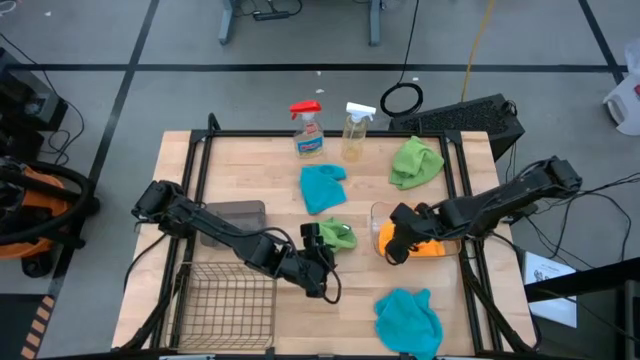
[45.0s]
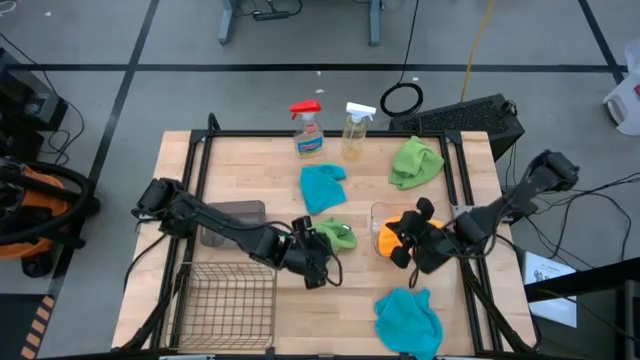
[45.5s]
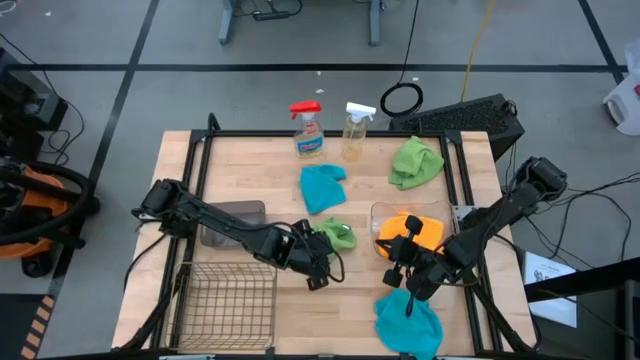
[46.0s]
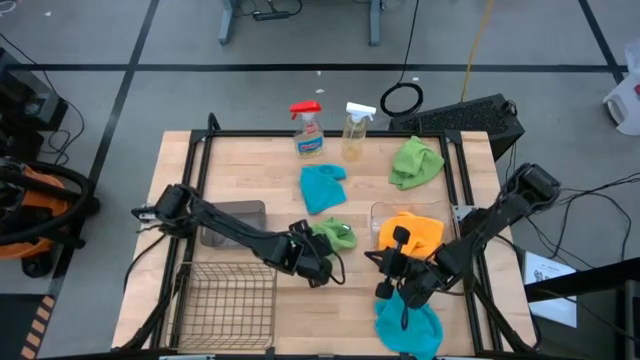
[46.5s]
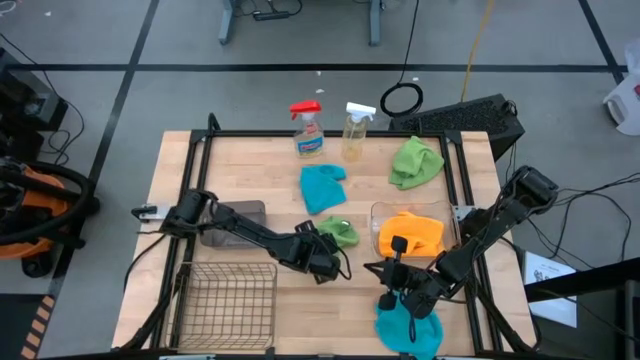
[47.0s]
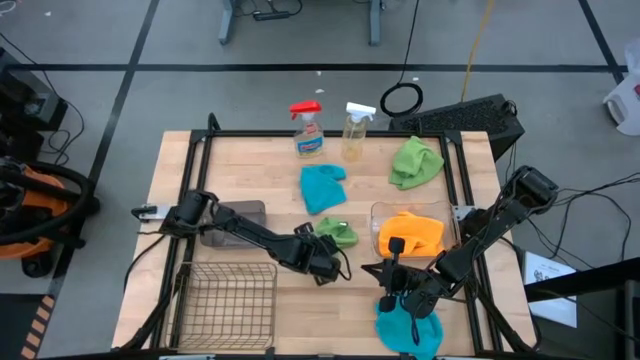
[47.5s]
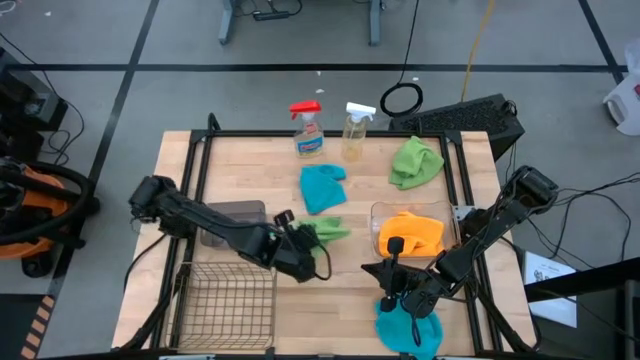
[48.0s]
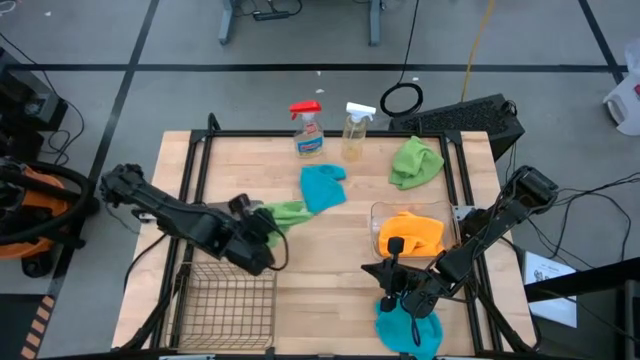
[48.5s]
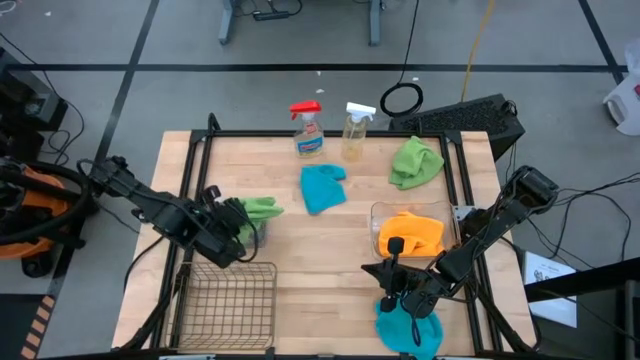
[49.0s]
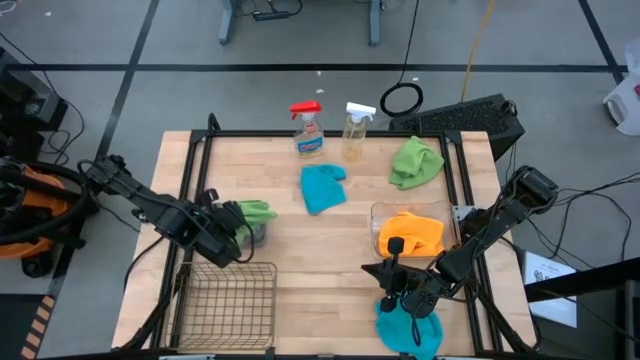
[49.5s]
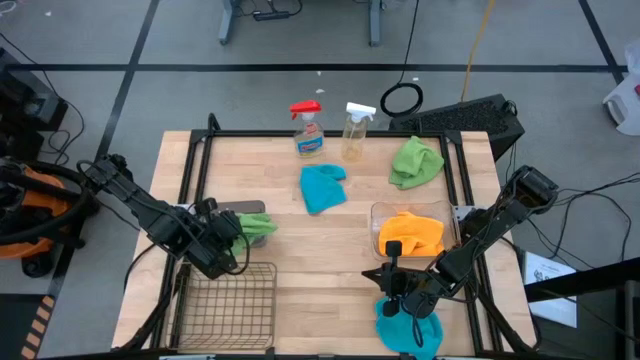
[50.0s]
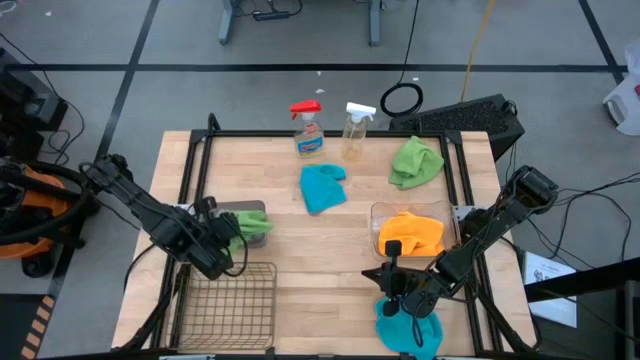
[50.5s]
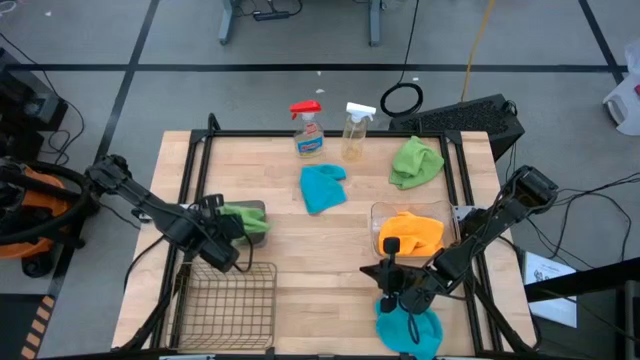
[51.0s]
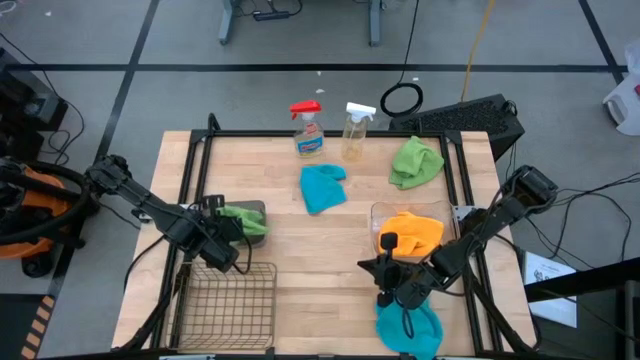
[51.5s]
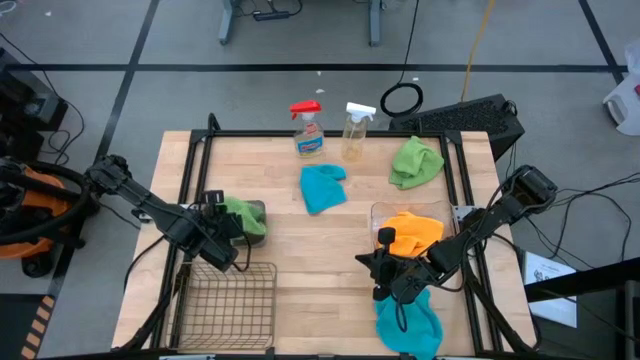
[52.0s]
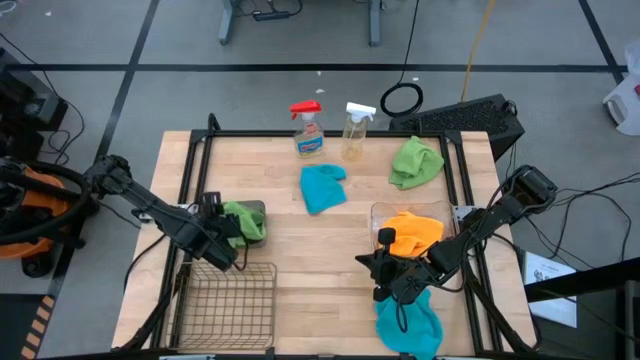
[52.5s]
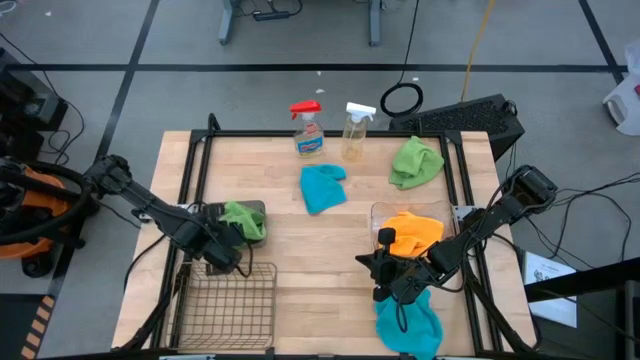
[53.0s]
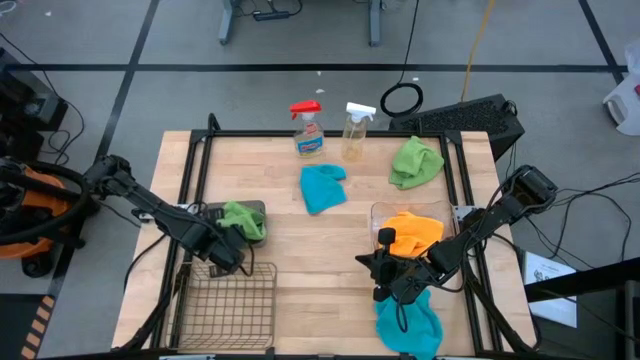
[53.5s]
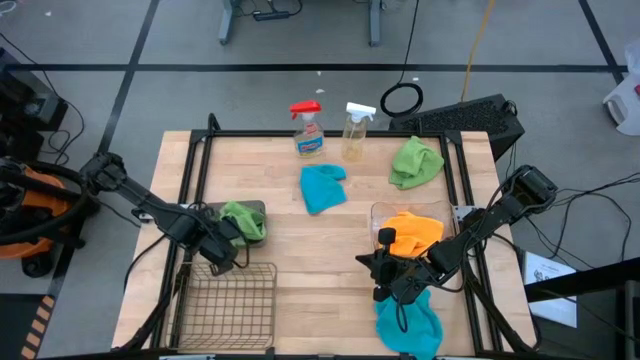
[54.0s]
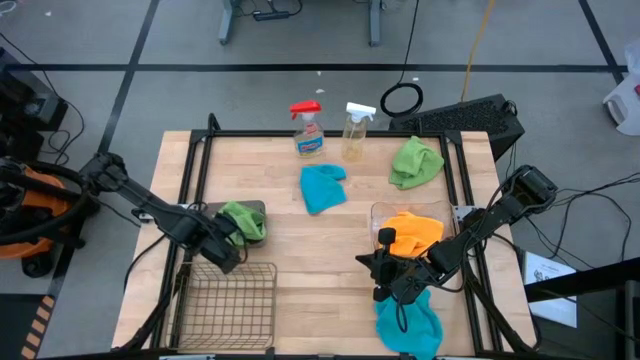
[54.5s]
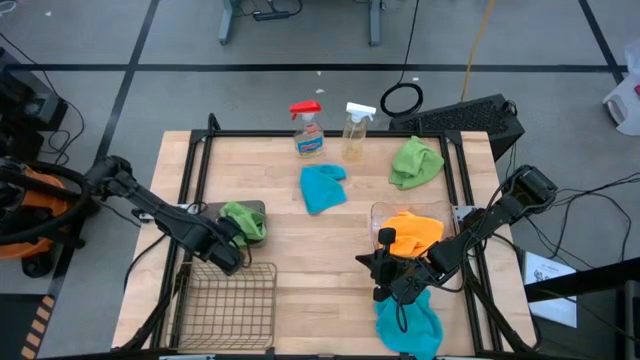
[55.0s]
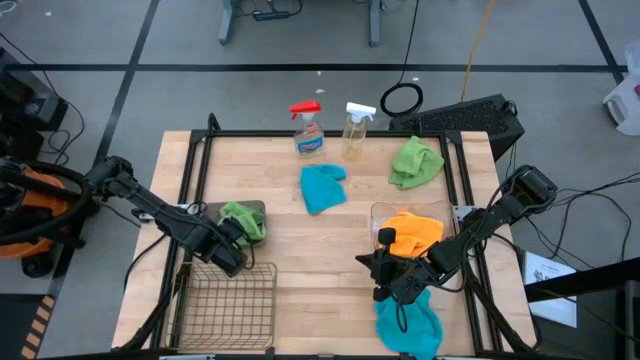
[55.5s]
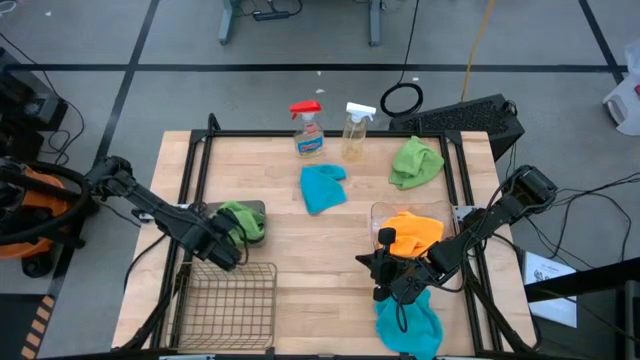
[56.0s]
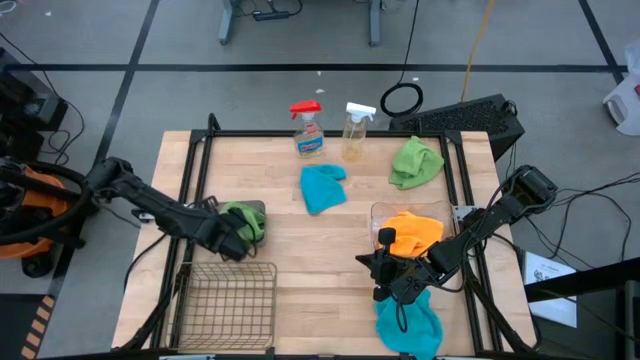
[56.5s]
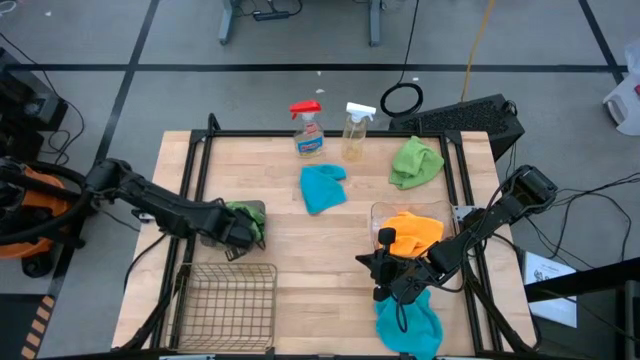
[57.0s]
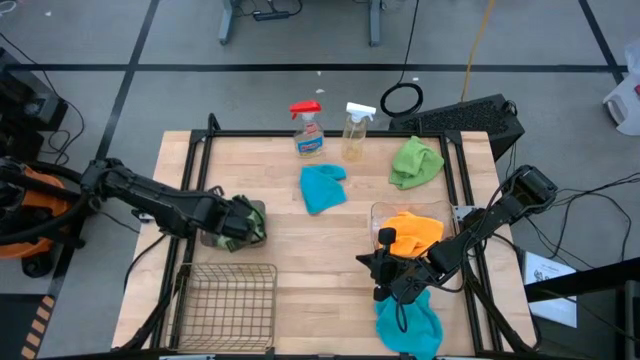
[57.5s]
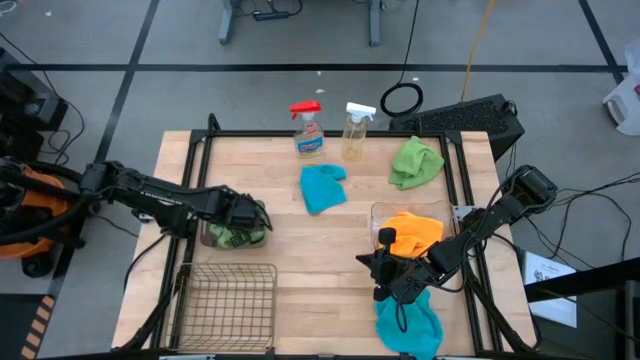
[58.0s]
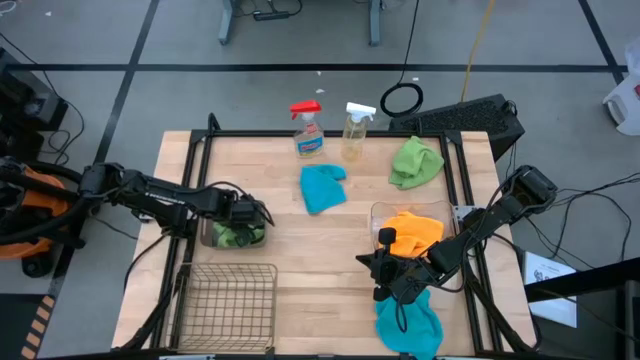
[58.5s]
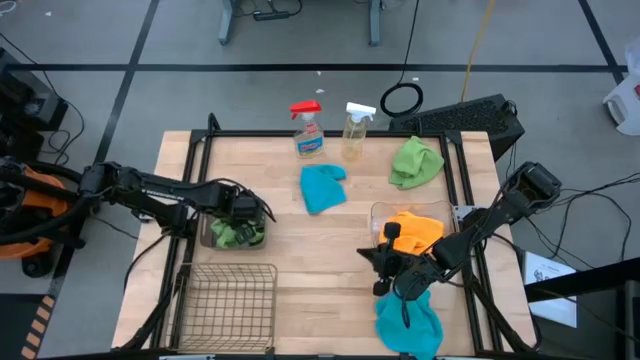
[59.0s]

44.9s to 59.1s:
Task: Sort microfiber towel by color & place in baskets
Put the bottom green microfiber towel into the black bin

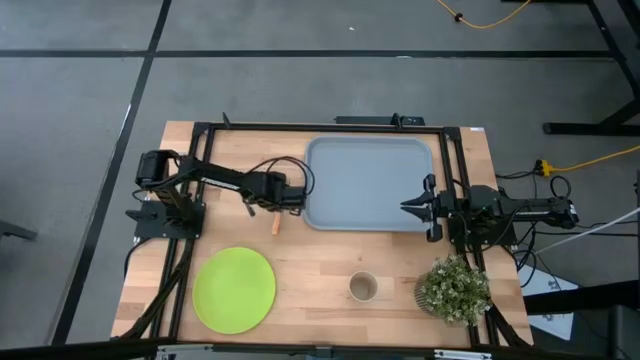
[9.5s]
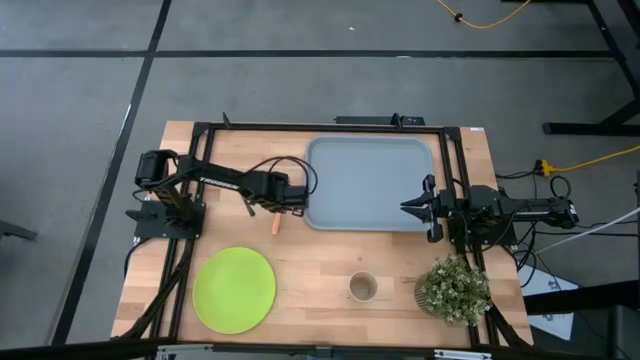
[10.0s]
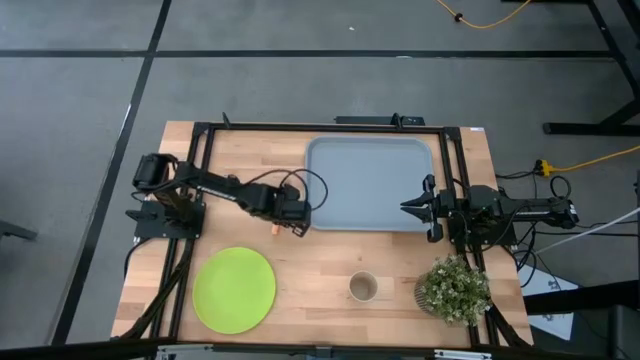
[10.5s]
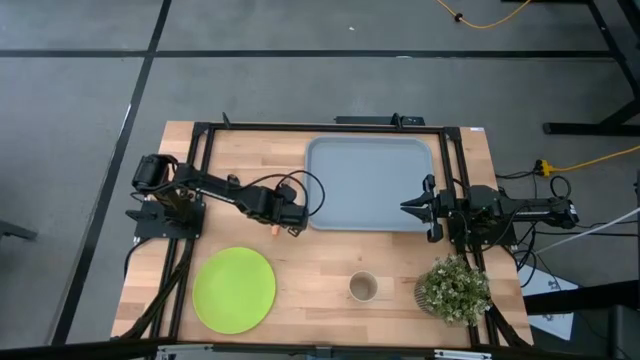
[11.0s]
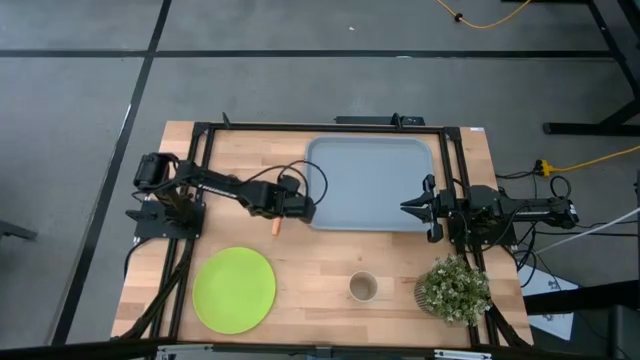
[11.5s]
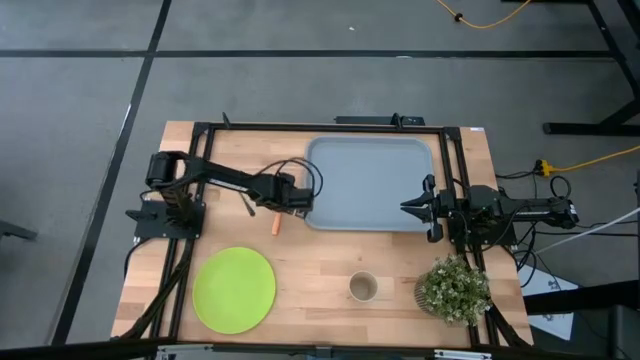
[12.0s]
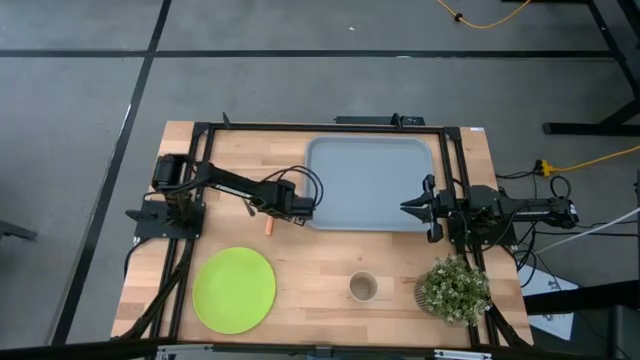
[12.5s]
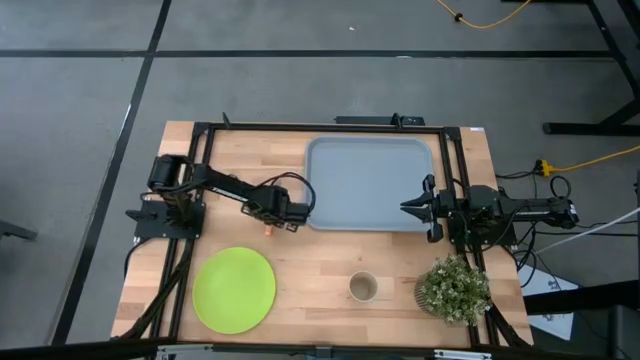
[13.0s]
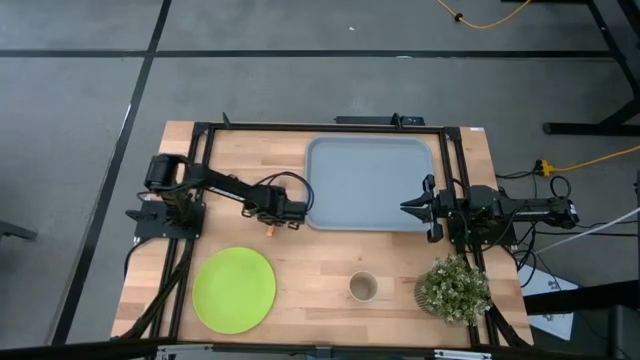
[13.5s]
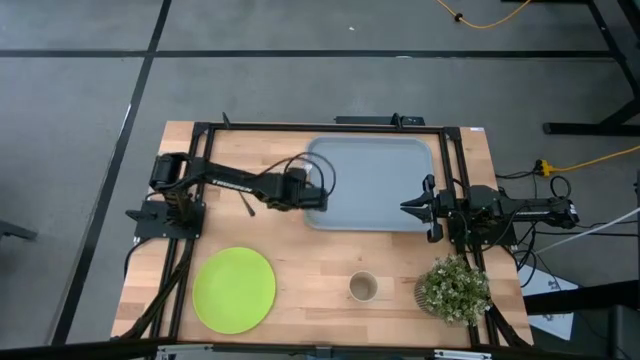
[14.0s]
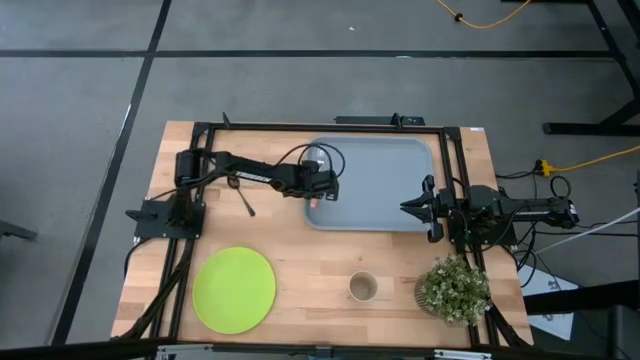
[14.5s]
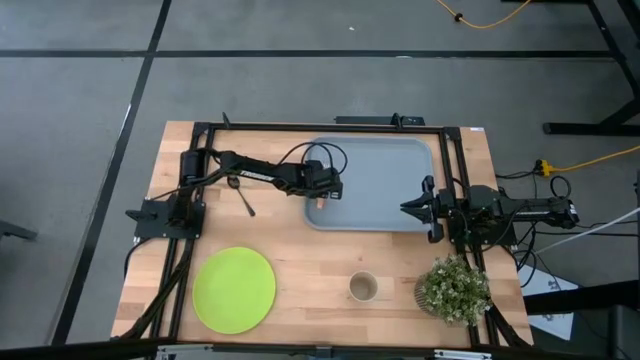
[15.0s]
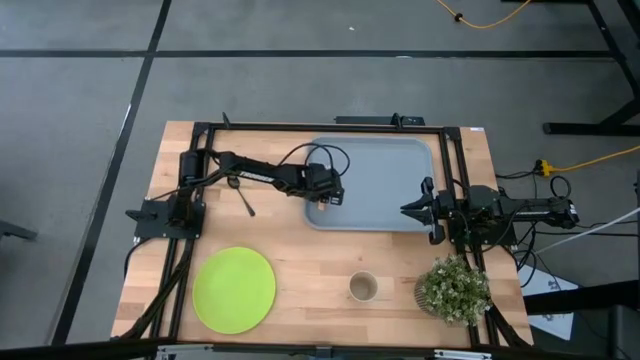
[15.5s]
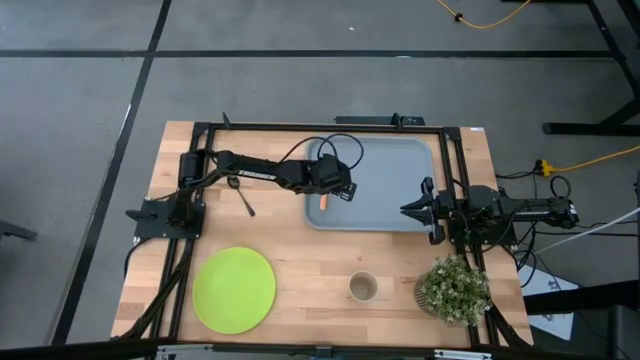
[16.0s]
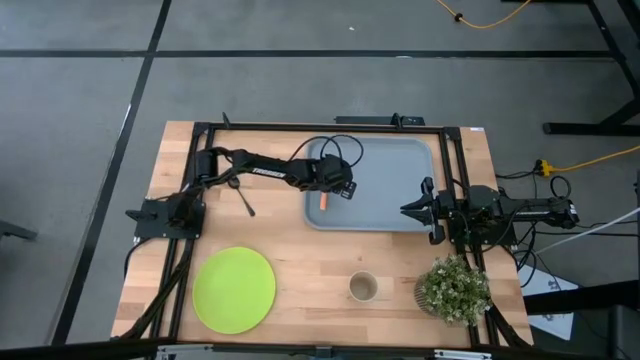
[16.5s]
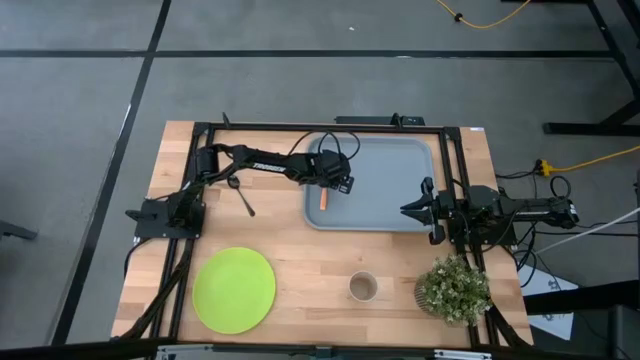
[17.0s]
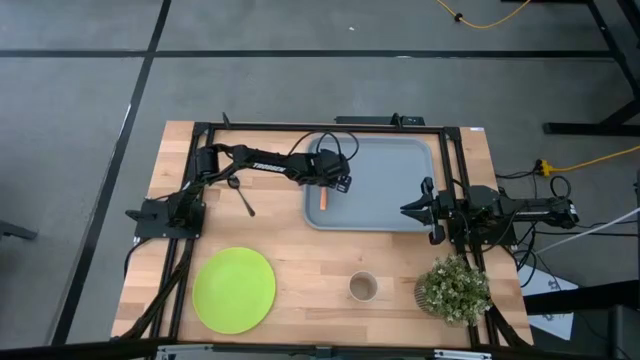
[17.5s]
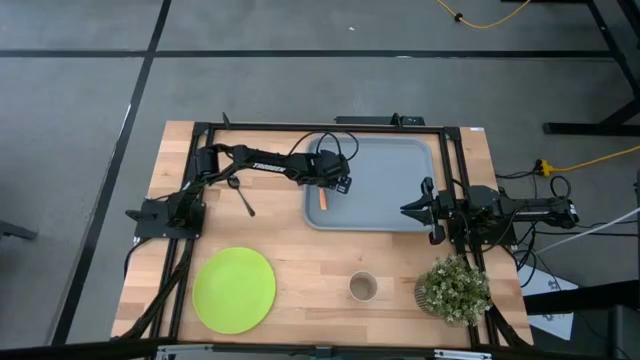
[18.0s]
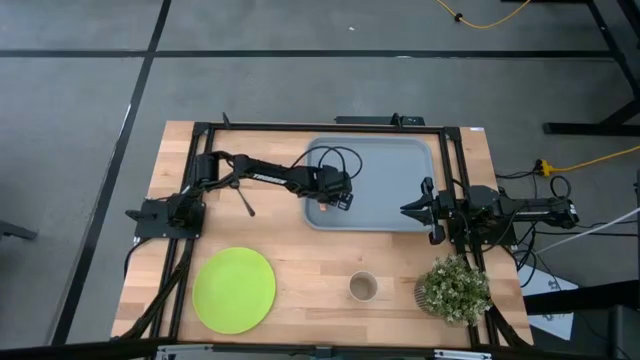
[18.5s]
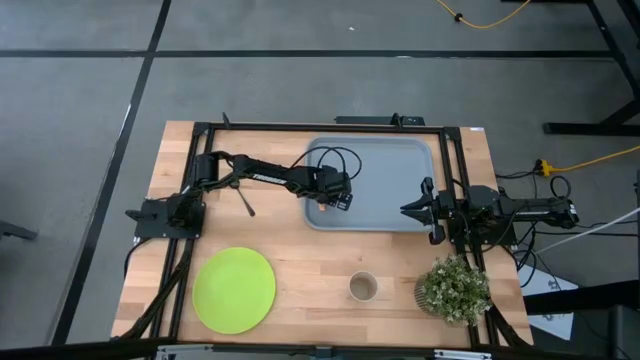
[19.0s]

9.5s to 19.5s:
Task: Pick and place plate/cup/fork/spoon on tray
Put the light orange fork on the light blue tray
